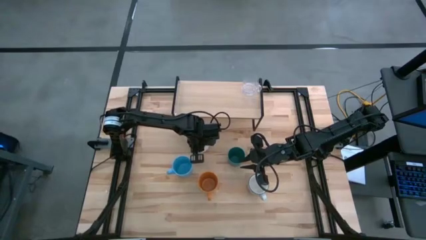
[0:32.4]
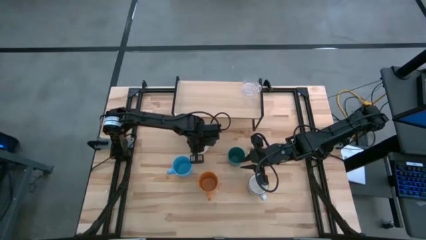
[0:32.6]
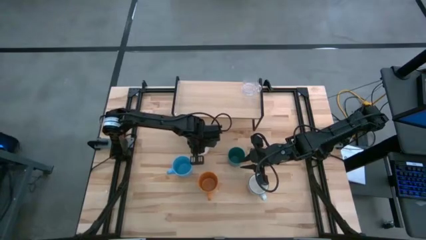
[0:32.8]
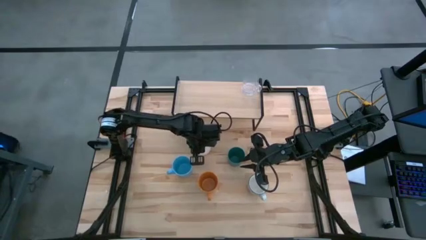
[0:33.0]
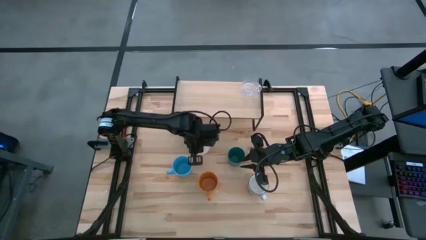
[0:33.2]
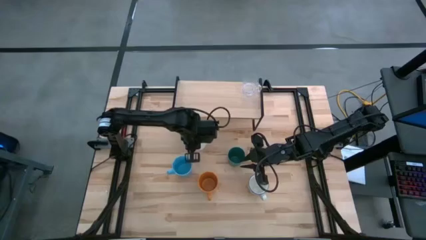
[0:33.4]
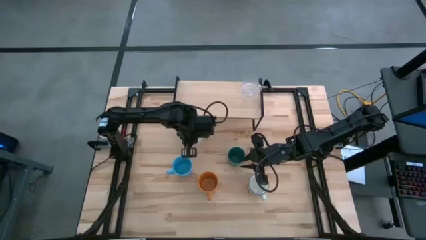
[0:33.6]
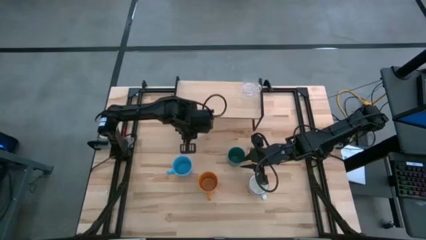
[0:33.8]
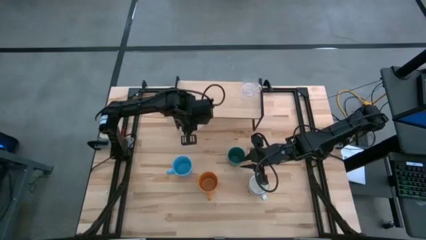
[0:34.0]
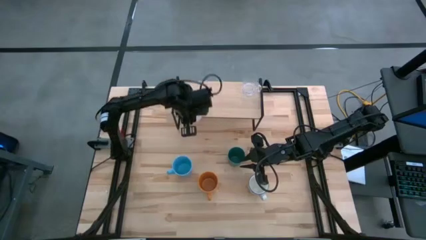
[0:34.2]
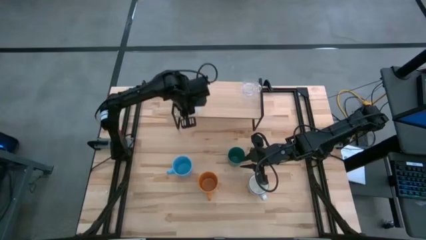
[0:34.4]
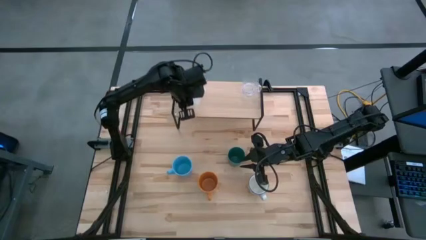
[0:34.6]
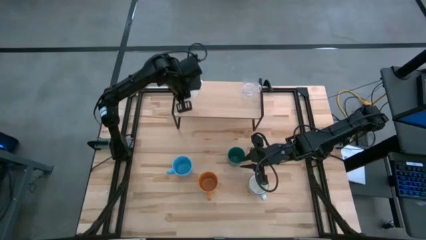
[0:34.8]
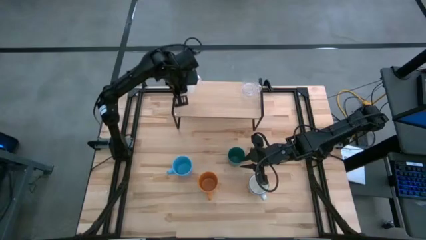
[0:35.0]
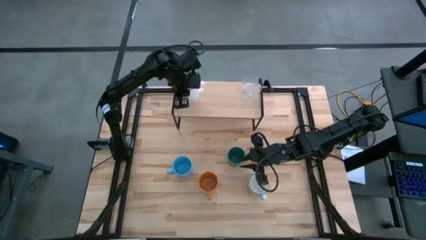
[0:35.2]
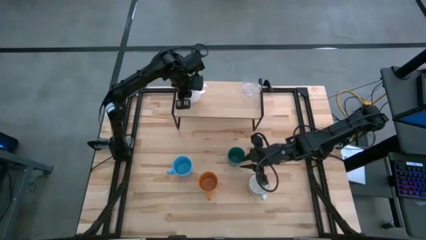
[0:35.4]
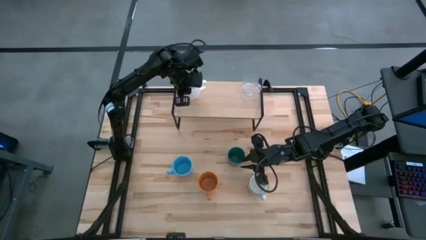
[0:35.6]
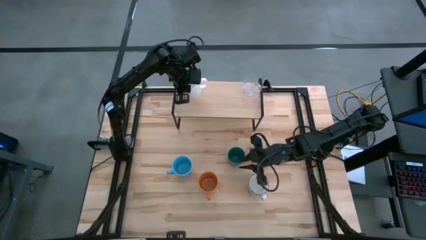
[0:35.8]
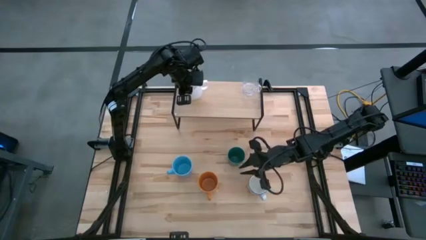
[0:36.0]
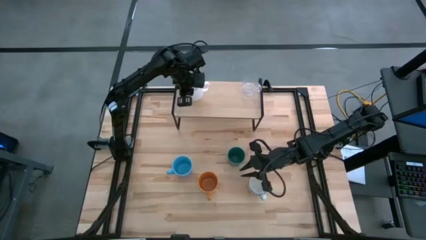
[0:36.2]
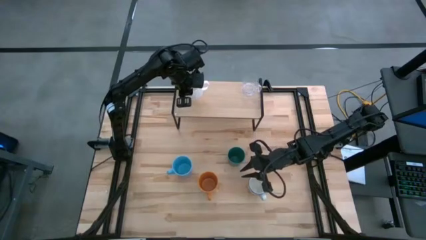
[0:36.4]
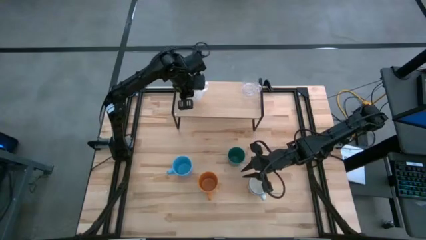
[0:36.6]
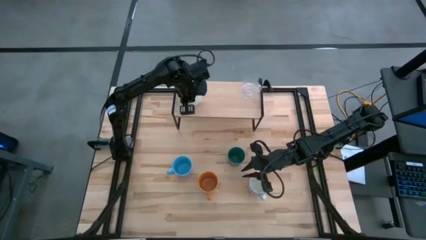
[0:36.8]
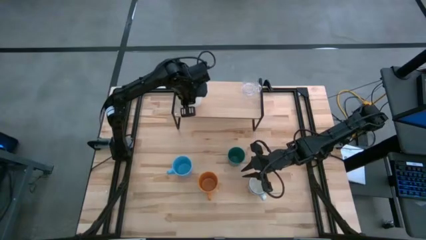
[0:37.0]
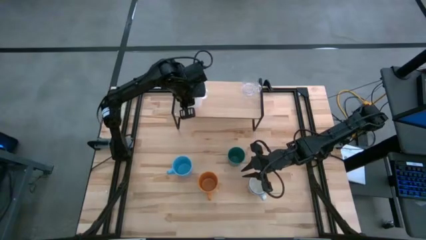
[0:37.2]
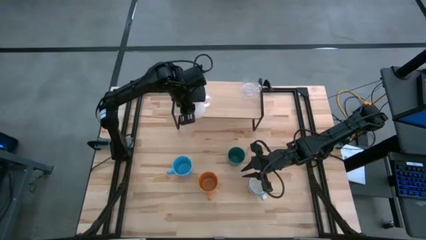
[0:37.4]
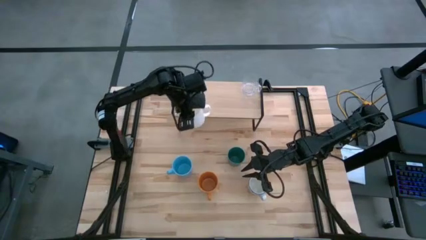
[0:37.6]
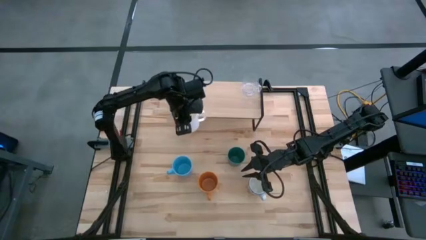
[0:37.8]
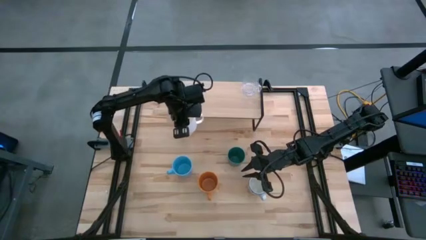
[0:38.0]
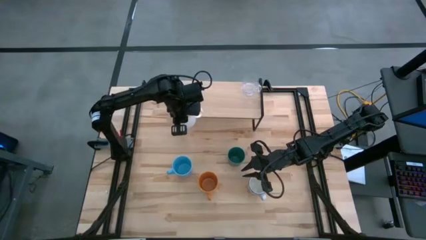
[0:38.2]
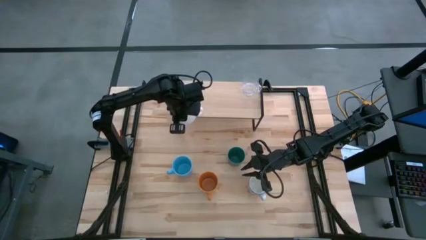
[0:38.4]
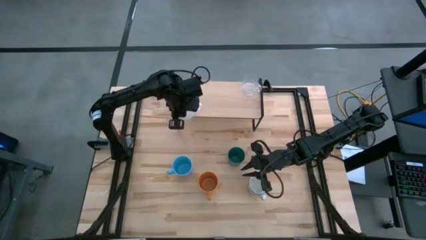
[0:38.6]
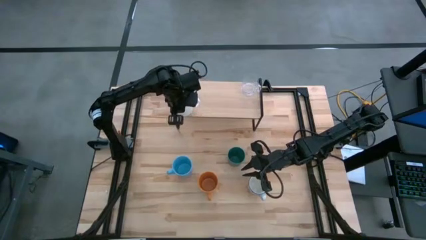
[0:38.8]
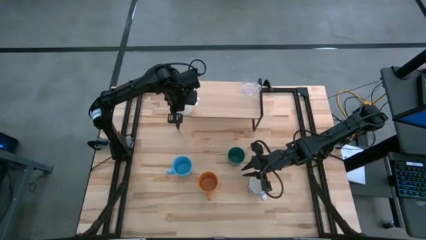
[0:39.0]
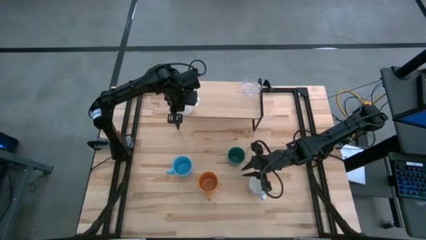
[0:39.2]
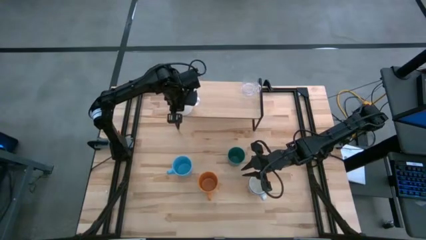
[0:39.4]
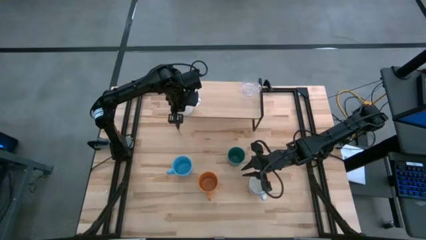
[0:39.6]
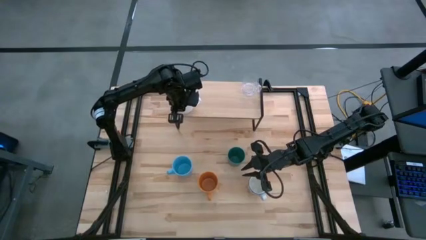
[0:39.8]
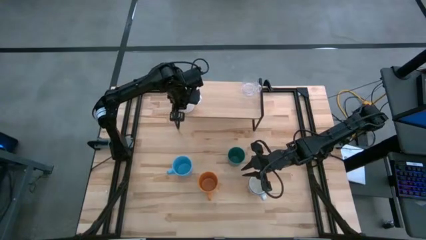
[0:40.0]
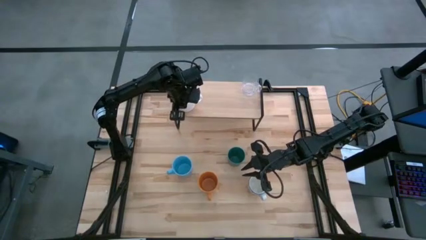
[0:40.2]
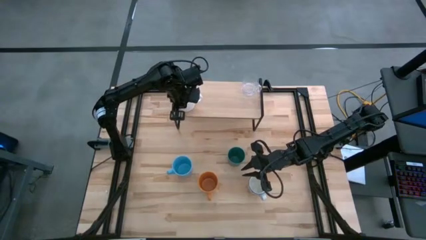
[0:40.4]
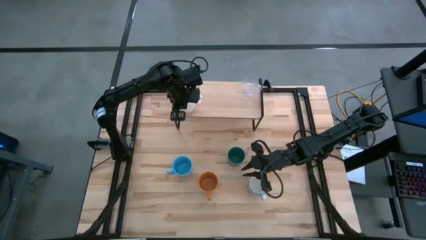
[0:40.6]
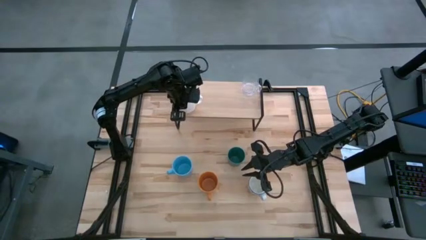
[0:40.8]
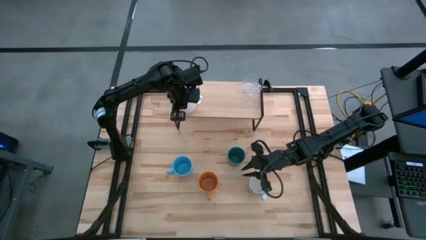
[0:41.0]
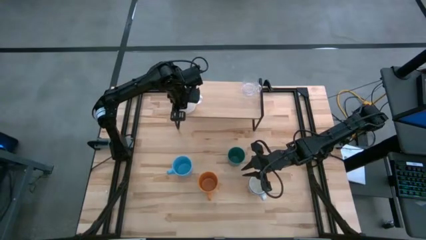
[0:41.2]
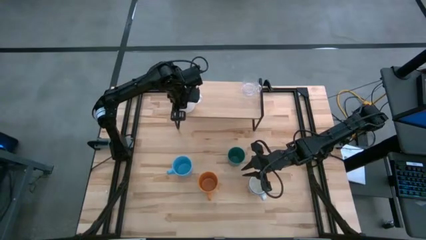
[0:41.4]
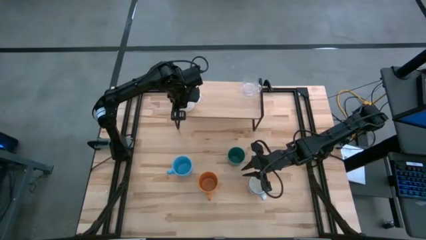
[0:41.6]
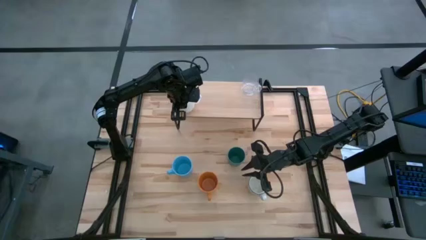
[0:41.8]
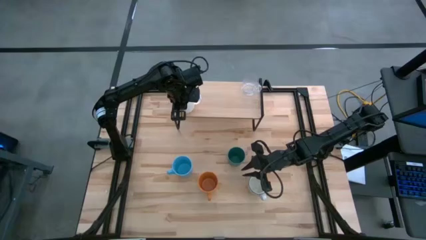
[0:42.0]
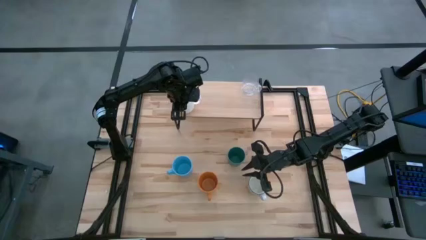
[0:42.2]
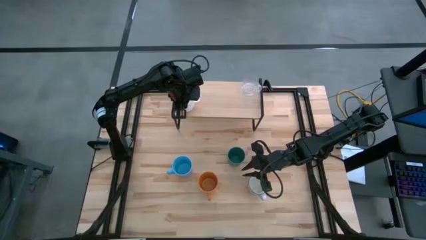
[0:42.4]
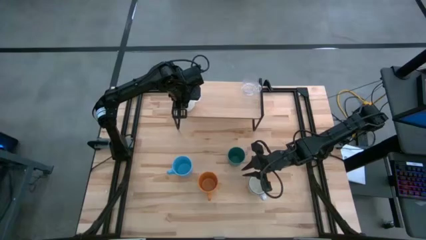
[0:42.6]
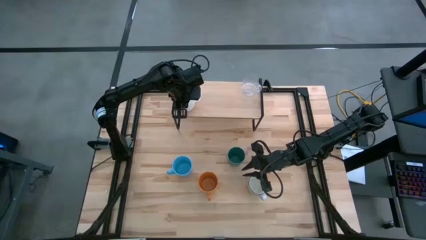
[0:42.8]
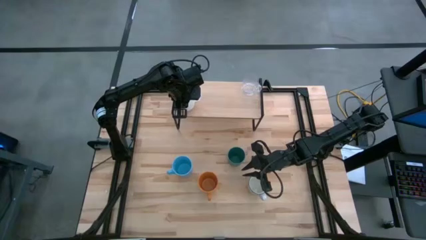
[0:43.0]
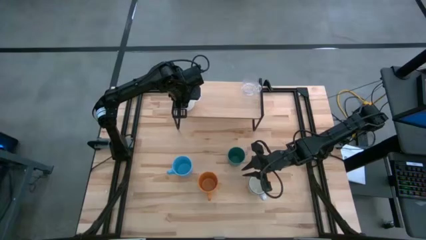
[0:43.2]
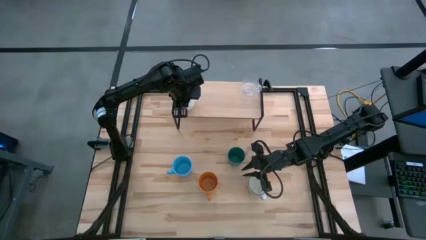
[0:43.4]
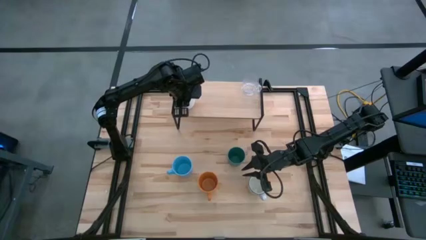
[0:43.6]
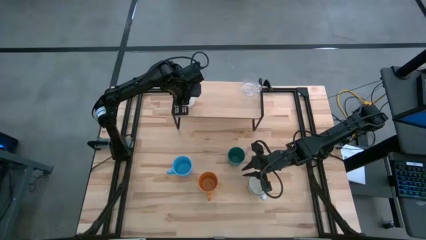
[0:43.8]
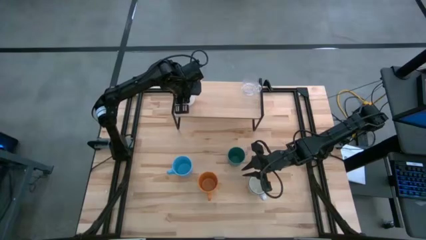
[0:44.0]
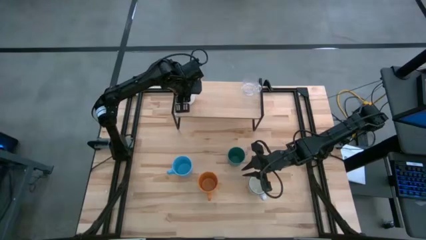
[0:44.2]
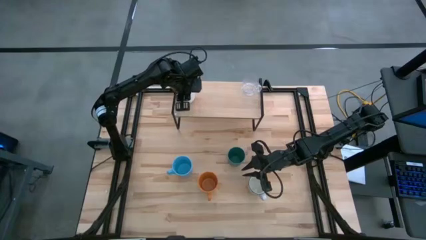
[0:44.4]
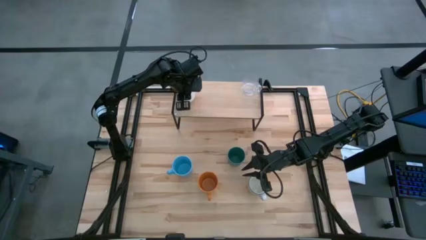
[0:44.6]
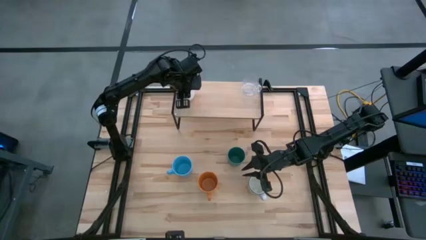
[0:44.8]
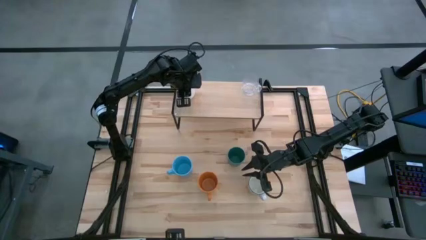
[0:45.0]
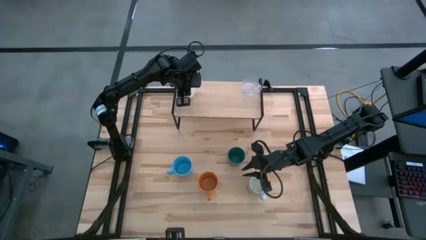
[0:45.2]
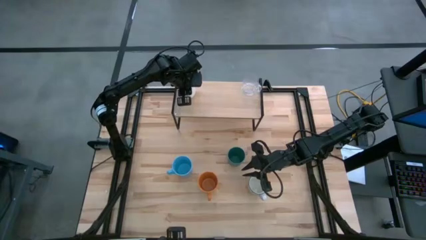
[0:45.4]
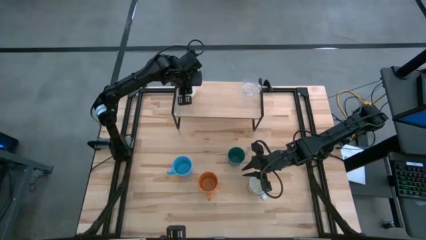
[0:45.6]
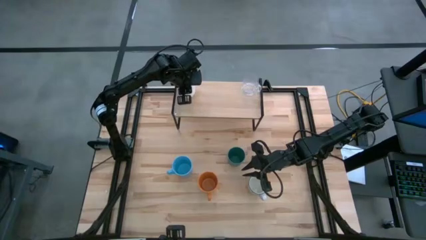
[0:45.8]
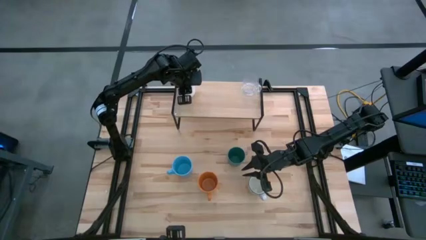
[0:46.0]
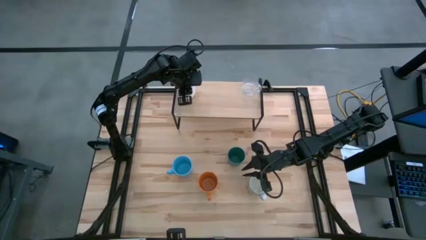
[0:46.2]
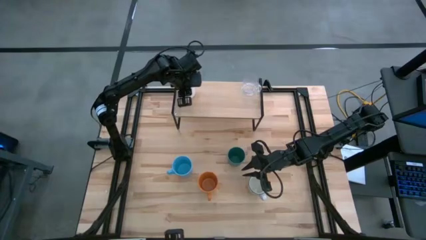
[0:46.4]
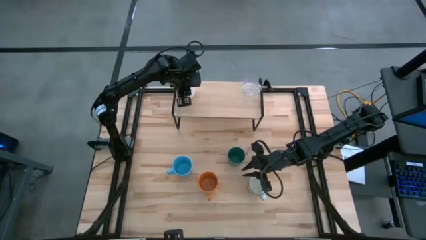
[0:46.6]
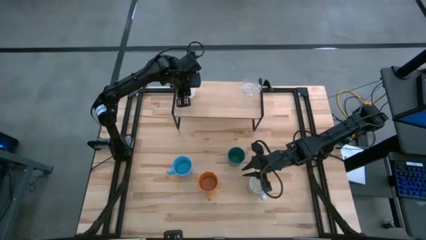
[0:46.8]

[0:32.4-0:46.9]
Task: Stack small to large cups/mugs on shelf
Put the white cup on the shelf
